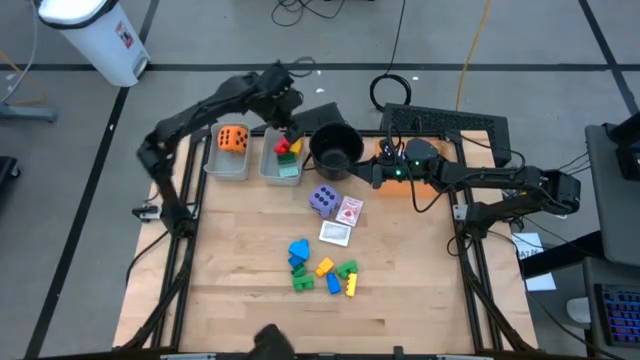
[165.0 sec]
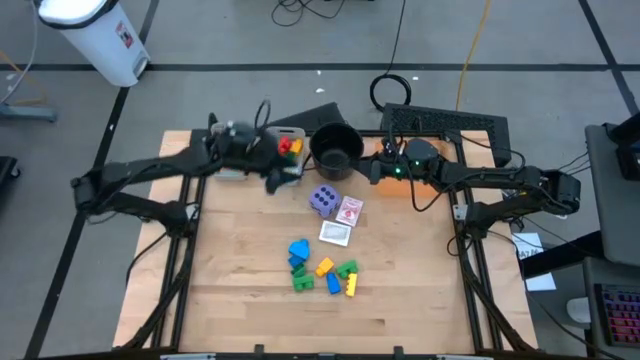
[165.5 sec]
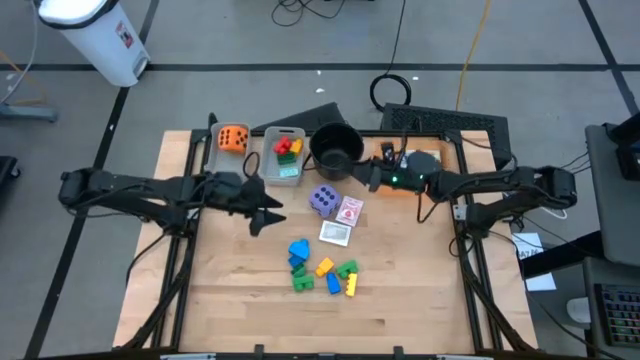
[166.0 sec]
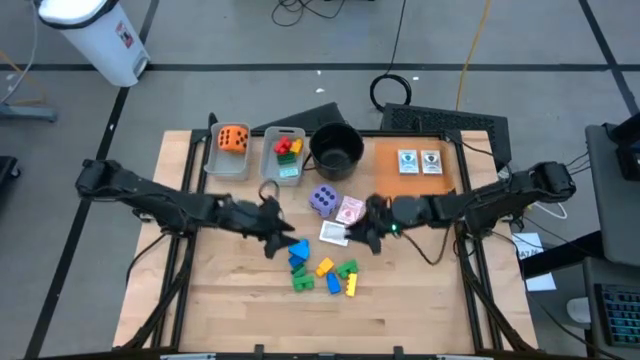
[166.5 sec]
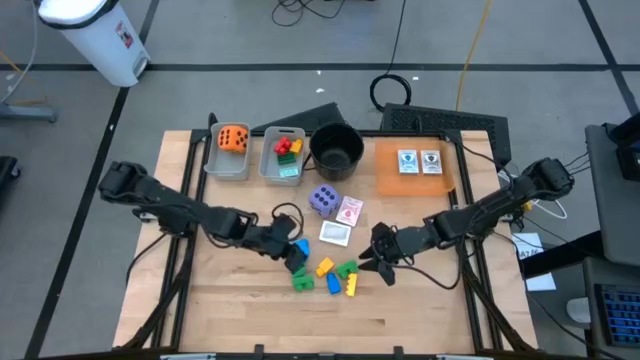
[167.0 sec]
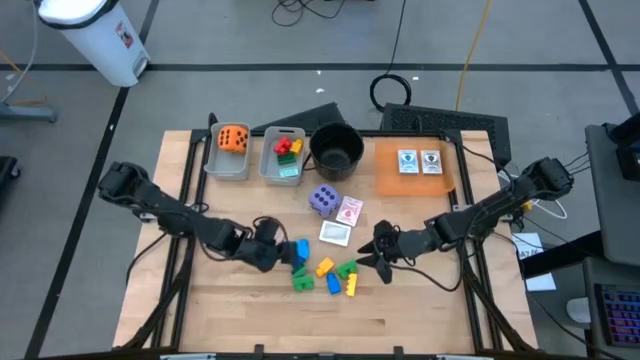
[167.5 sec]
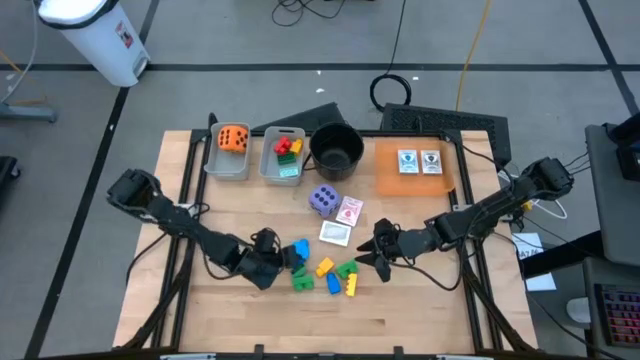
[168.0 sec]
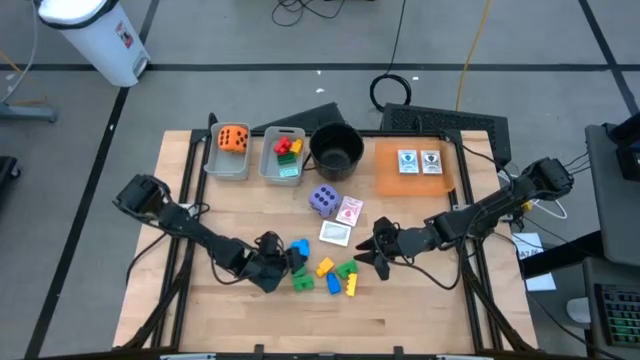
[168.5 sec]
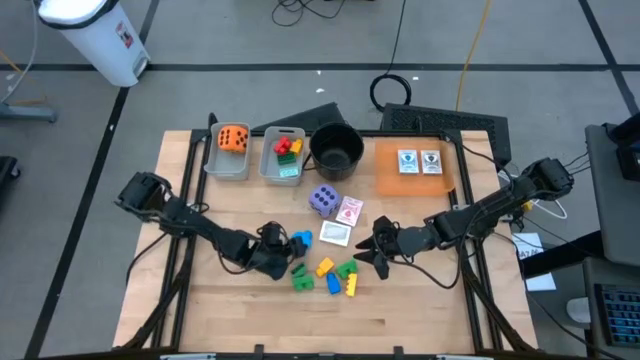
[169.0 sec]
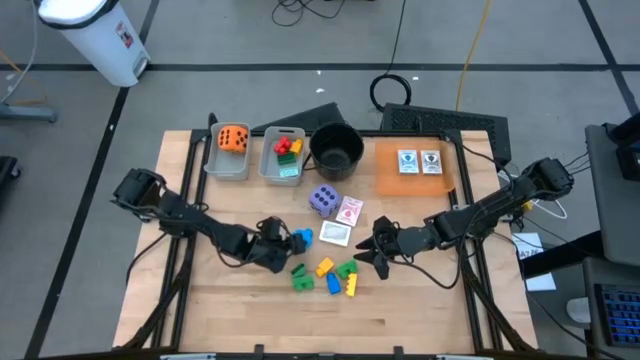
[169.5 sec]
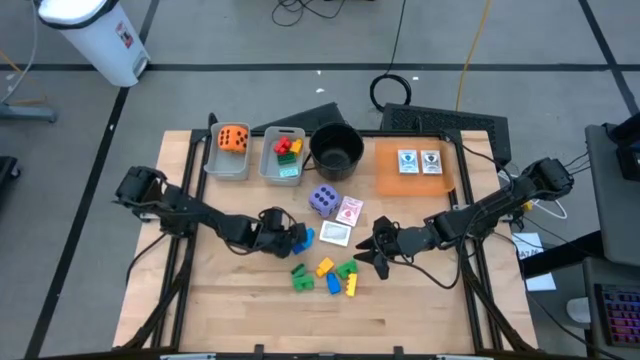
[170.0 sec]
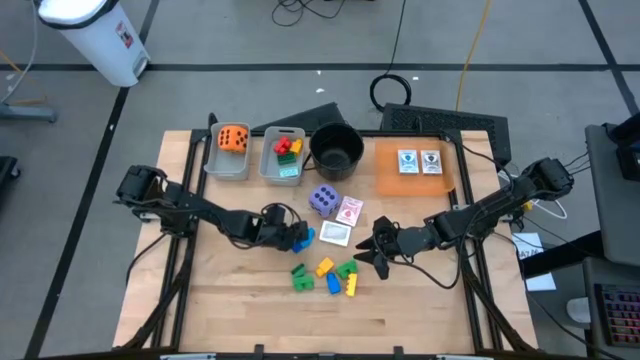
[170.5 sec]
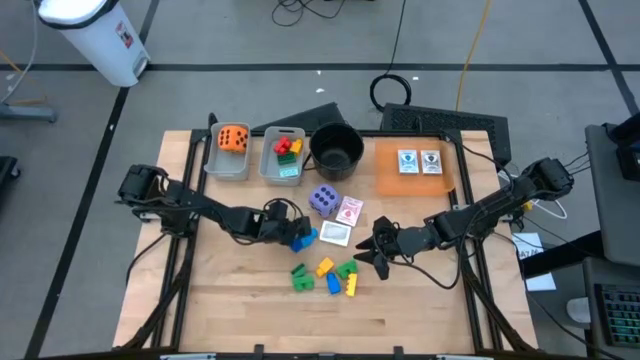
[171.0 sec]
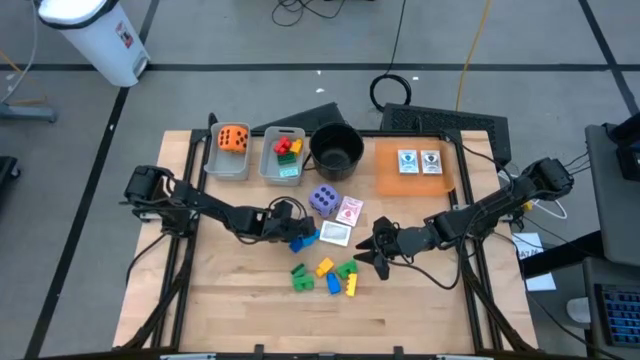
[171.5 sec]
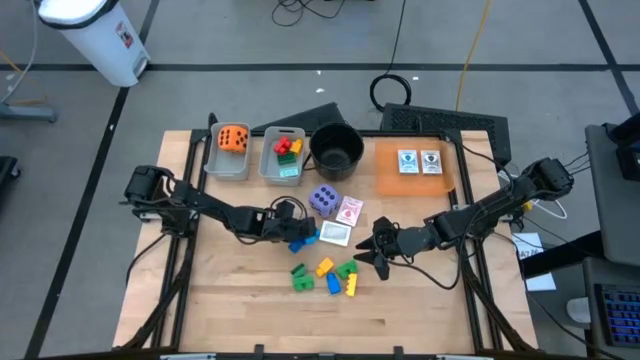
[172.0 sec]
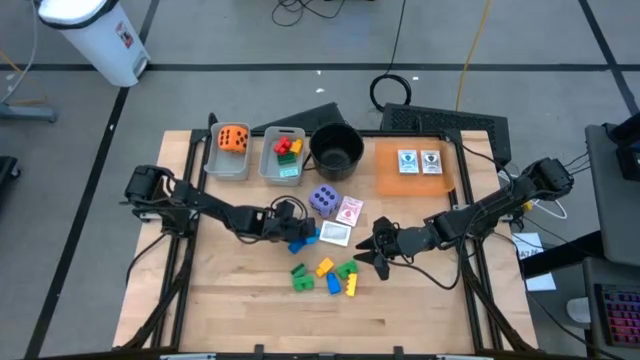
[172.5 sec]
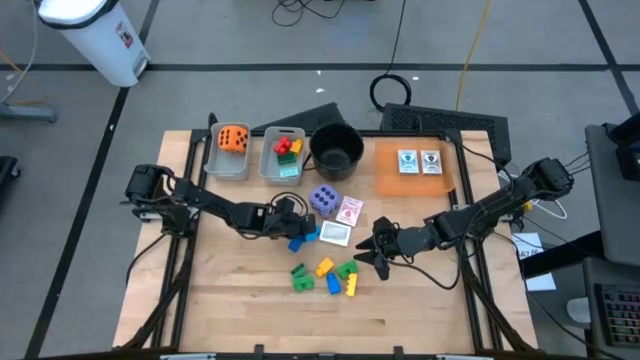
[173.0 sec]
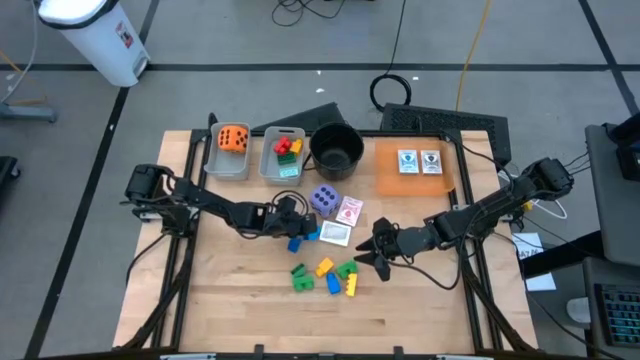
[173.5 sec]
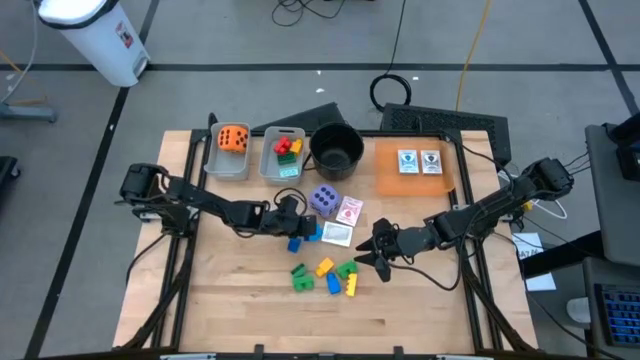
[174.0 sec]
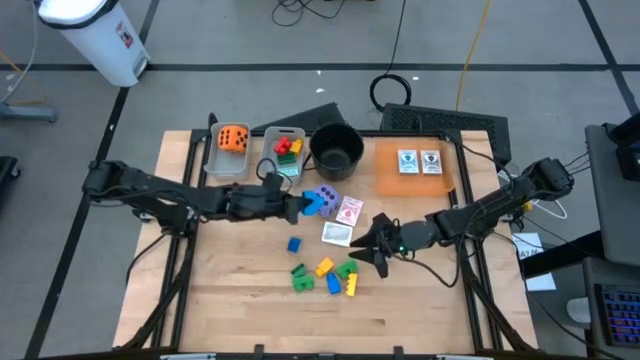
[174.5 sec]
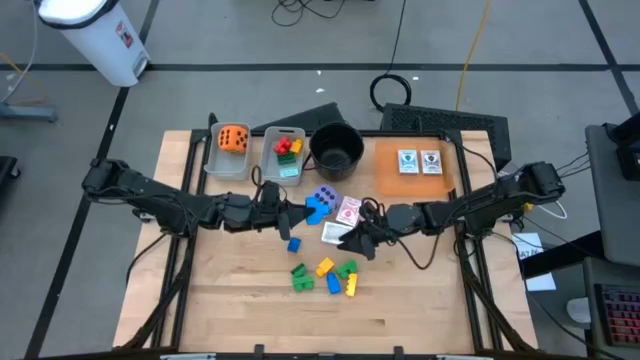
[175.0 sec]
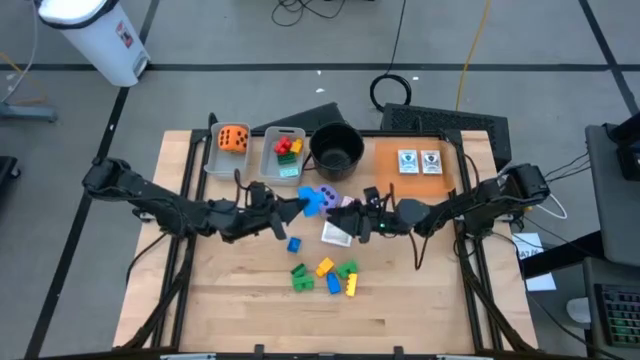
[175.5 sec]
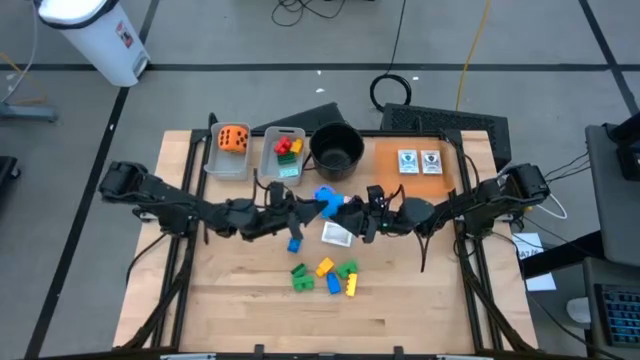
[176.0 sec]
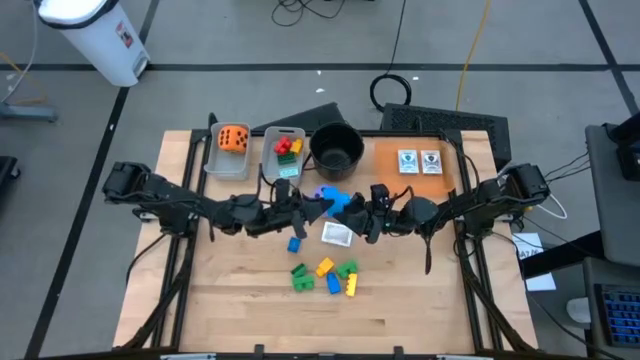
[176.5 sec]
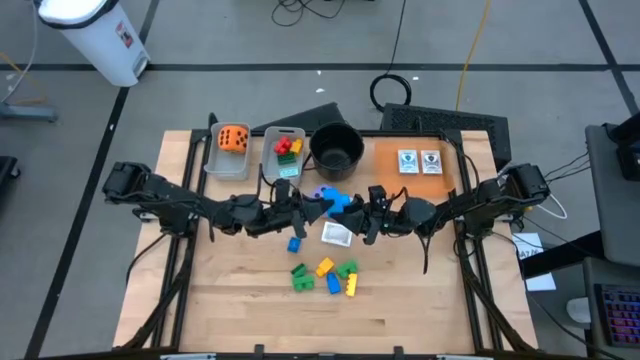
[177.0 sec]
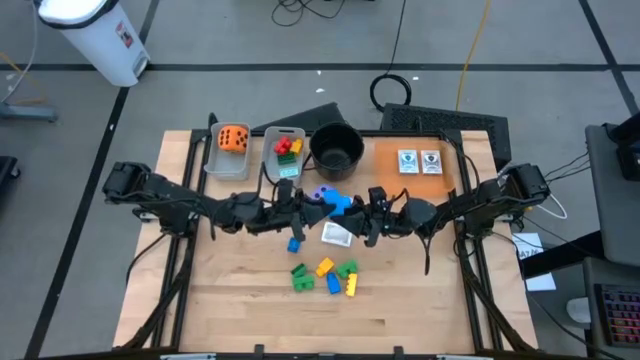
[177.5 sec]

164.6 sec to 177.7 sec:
Task: Pick & Place Toys
Put the blue game piece into the right gray bin

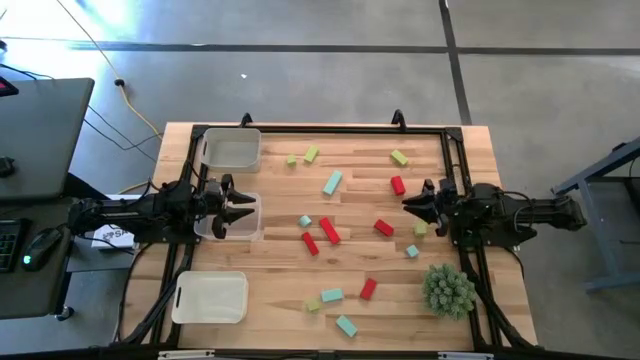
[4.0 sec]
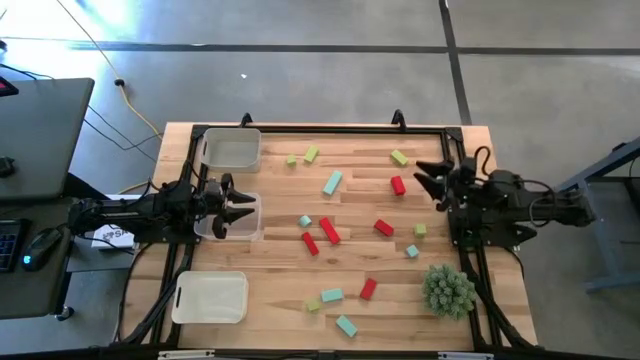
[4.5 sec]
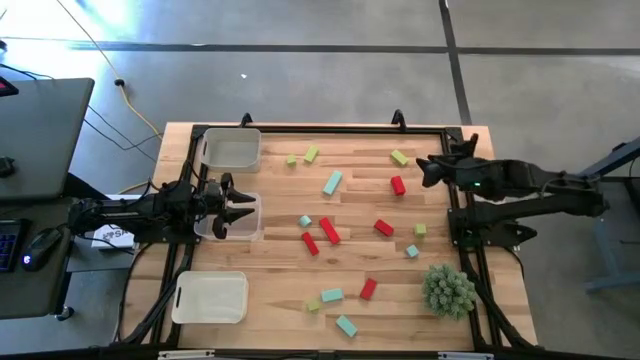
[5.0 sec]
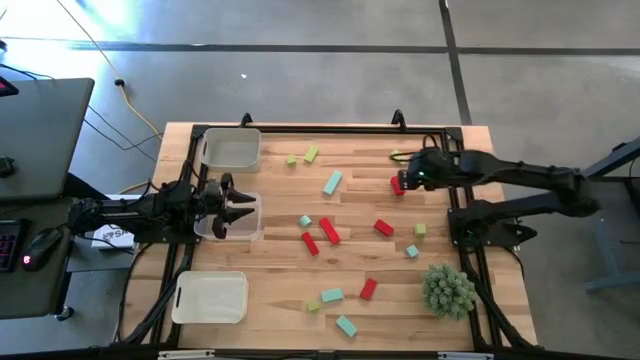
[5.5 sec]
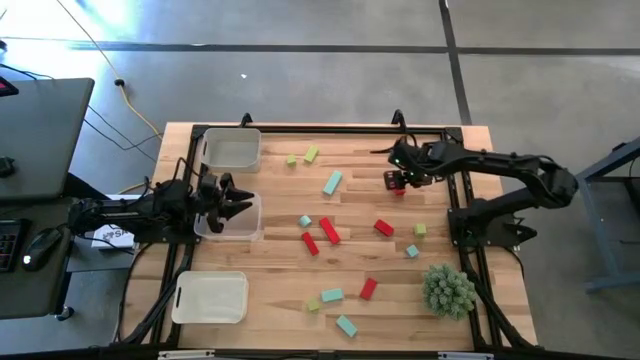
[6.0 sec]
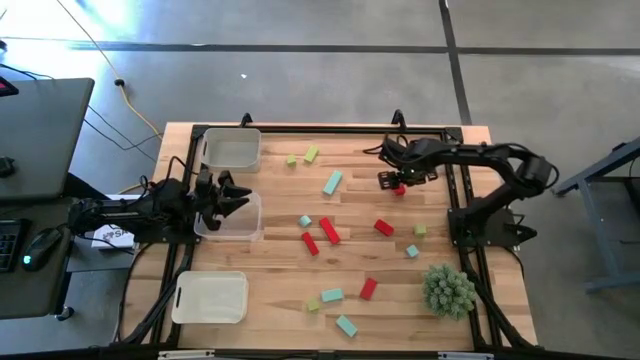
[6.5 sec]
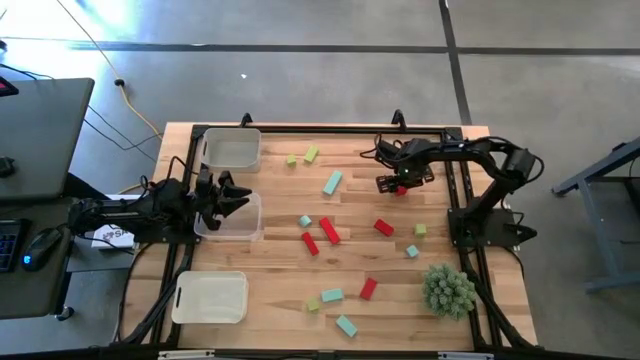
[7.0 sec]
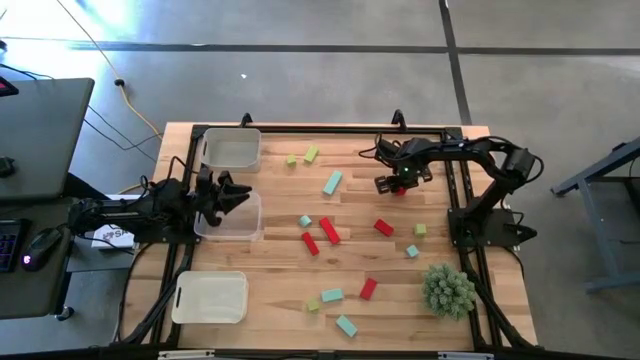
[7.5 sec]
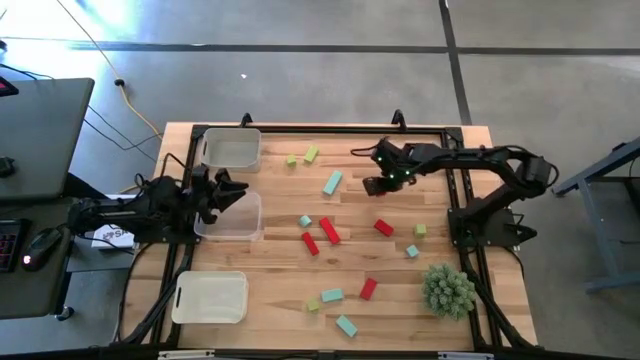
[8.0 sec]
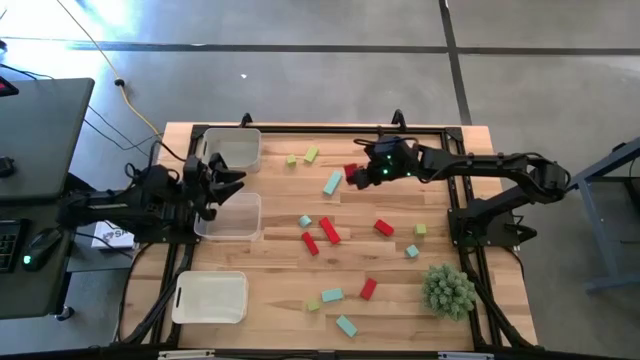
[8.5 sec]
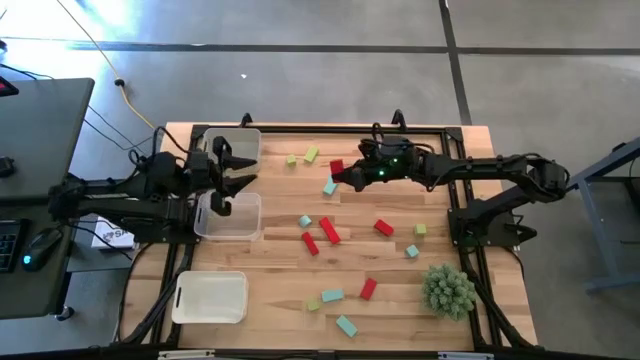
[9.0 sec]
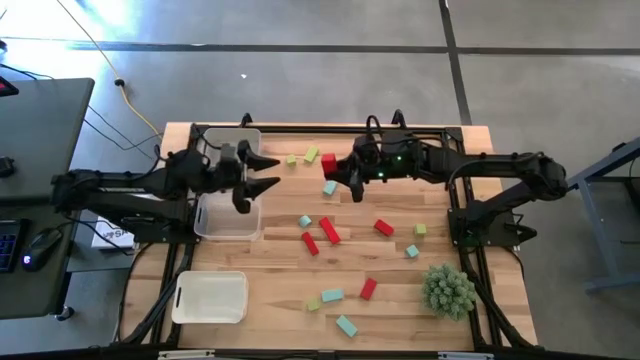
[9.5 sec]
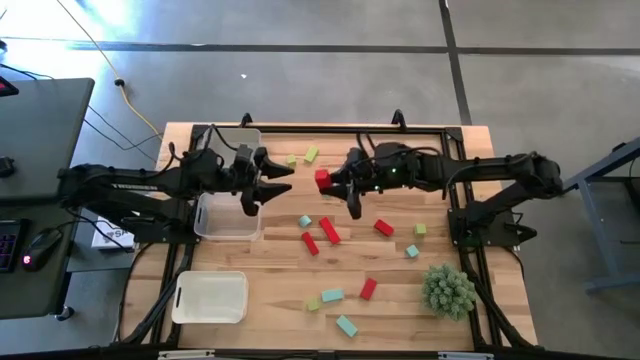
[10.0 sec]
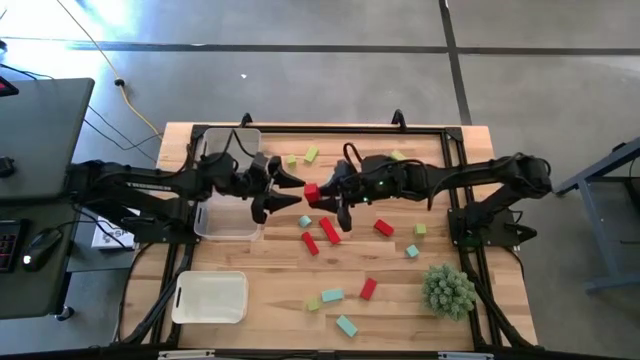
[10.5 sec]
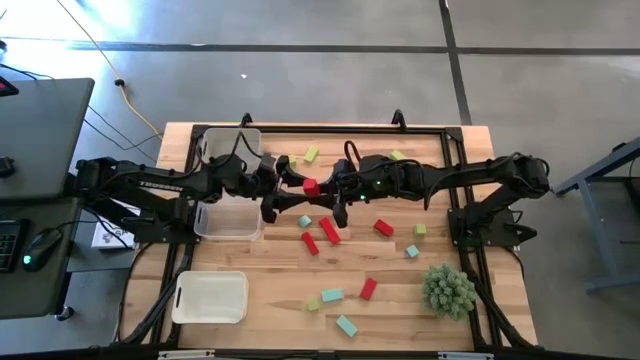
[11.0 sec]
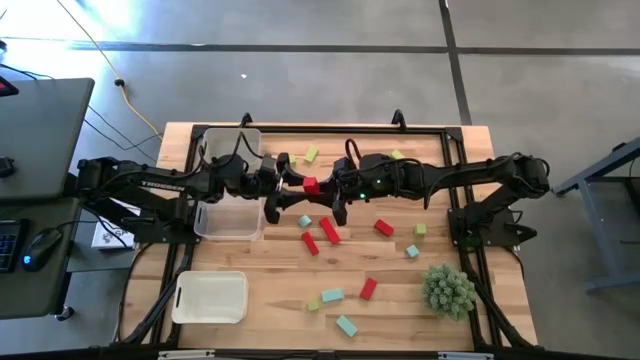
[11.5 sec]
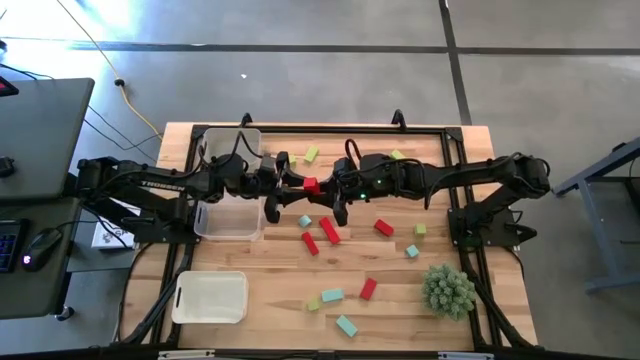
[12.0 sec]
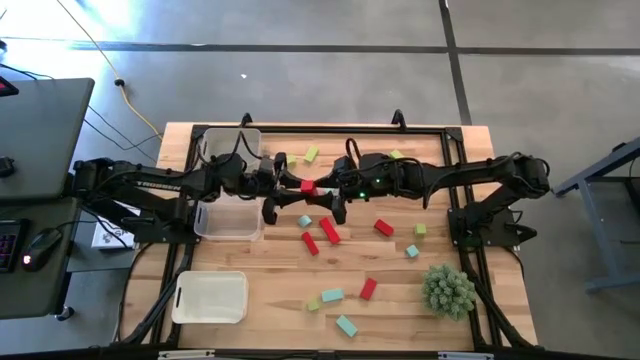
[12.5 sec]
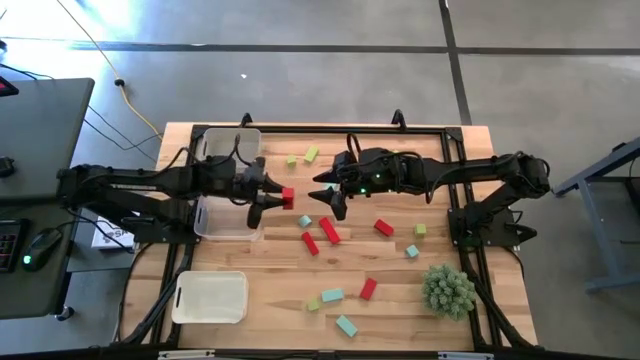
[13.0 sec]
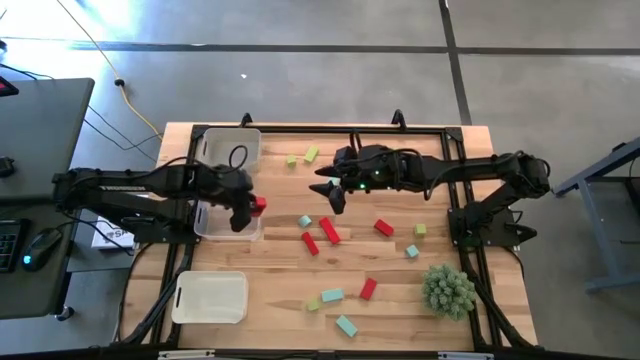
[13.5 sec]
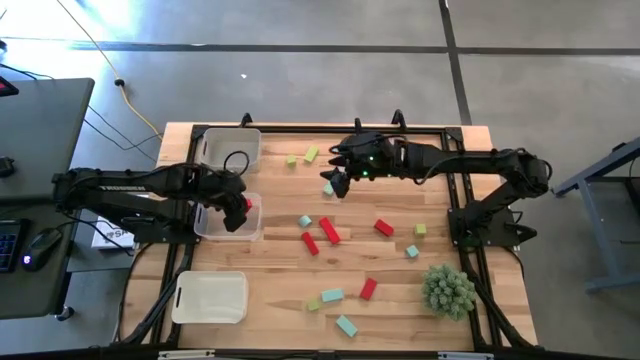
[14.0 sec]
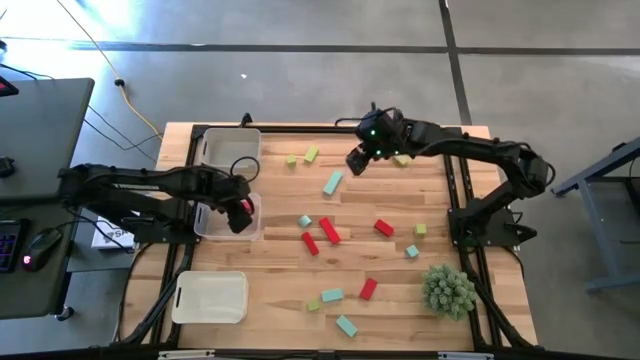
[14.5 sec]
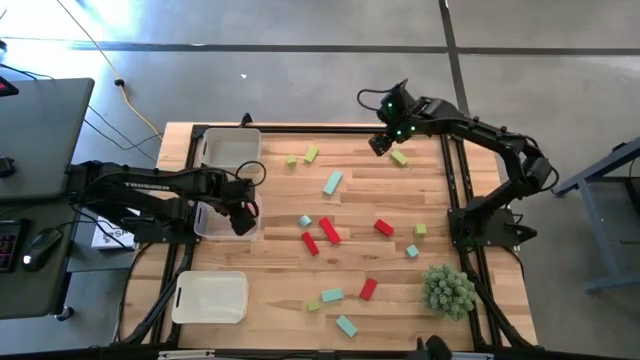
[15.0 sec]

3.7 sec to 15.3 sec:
Task: Sort & place blocks by color
Put the red block into the transparent bin
